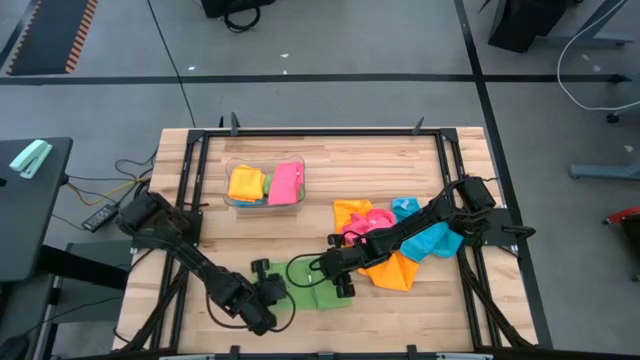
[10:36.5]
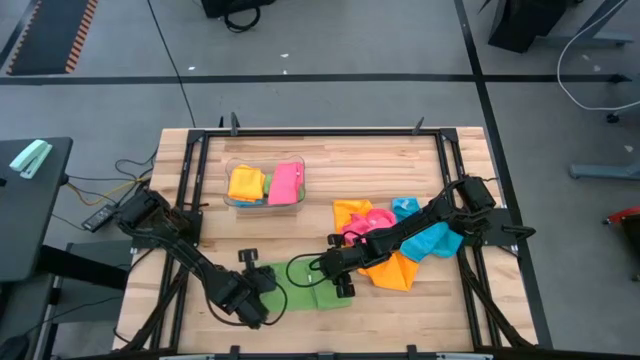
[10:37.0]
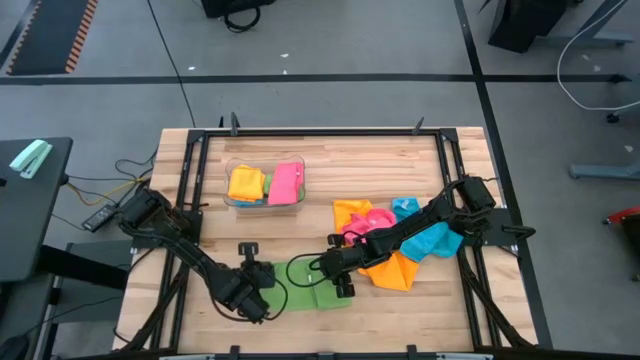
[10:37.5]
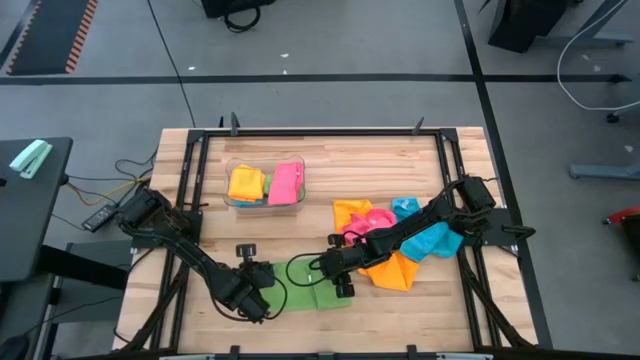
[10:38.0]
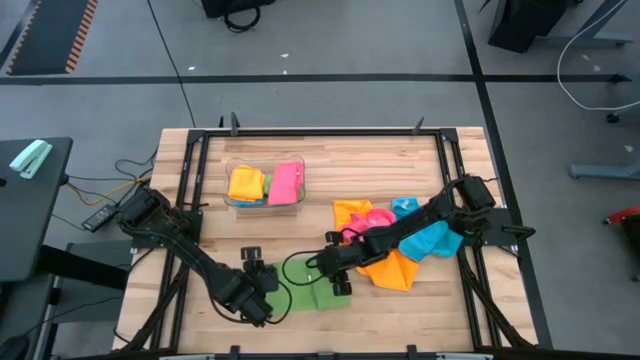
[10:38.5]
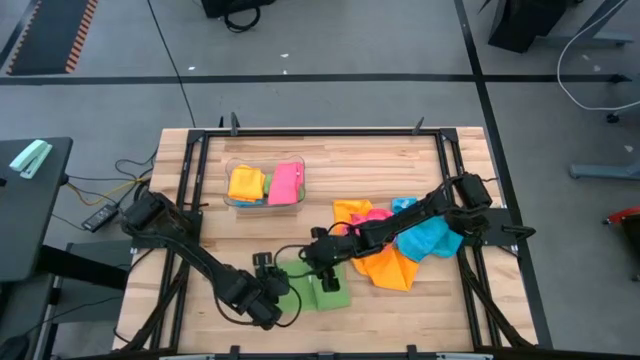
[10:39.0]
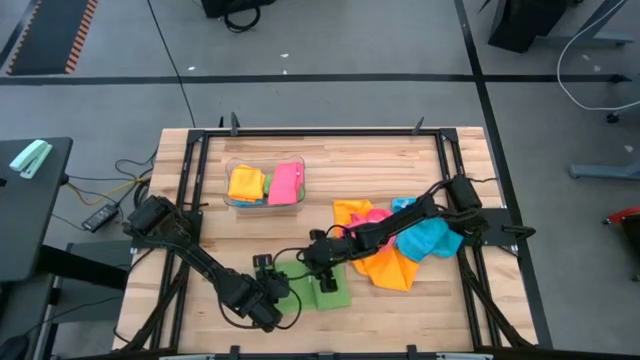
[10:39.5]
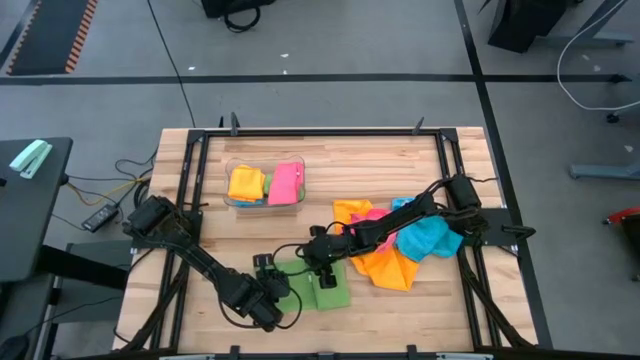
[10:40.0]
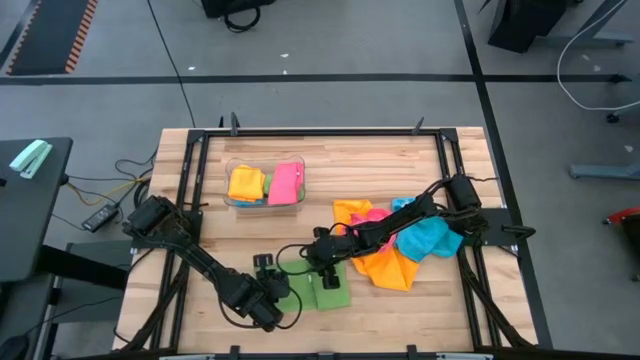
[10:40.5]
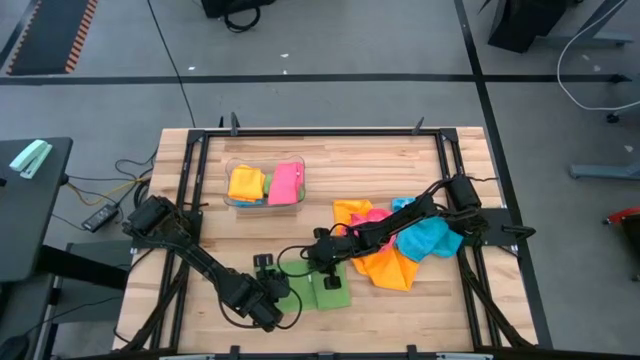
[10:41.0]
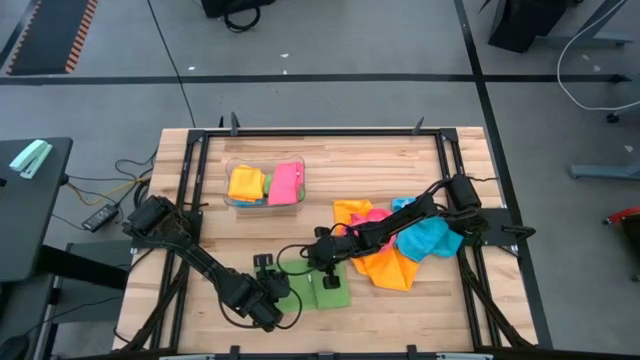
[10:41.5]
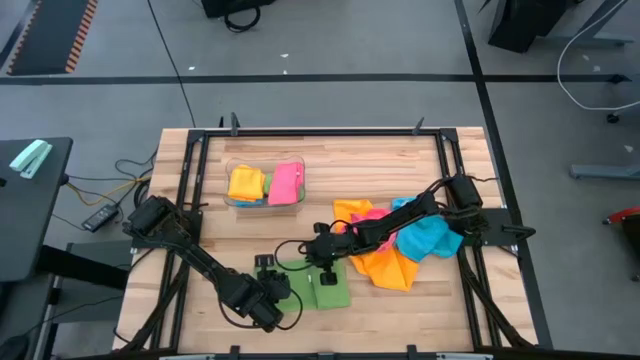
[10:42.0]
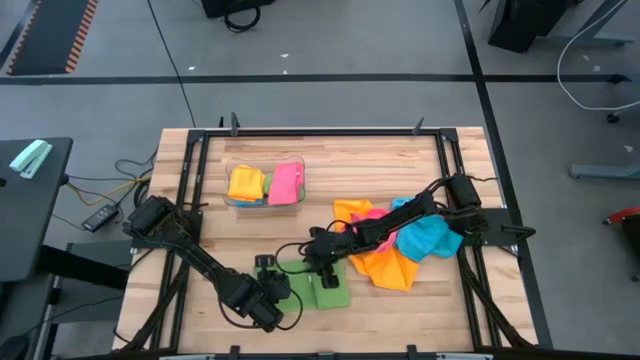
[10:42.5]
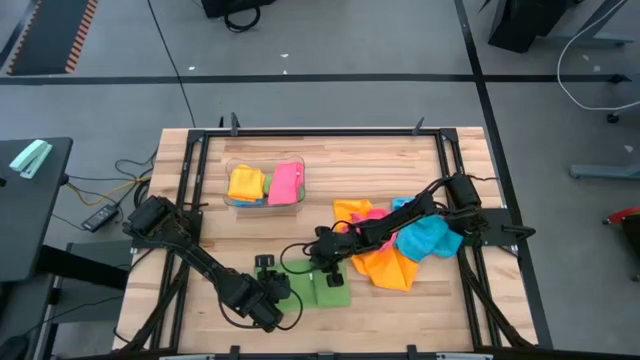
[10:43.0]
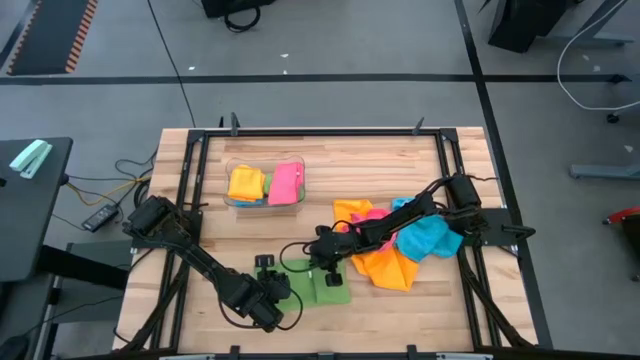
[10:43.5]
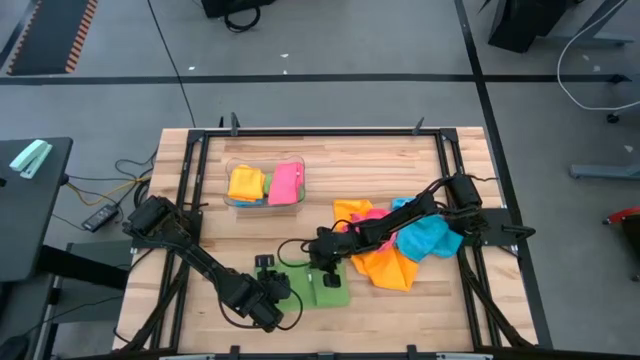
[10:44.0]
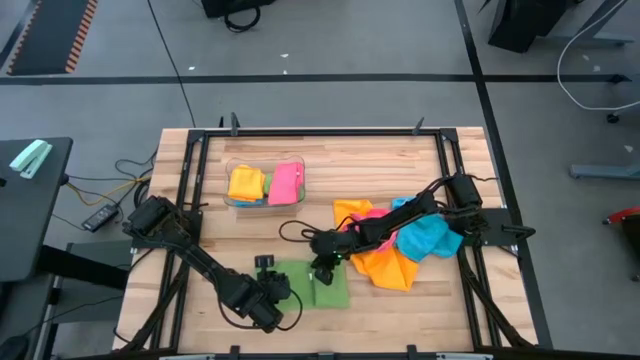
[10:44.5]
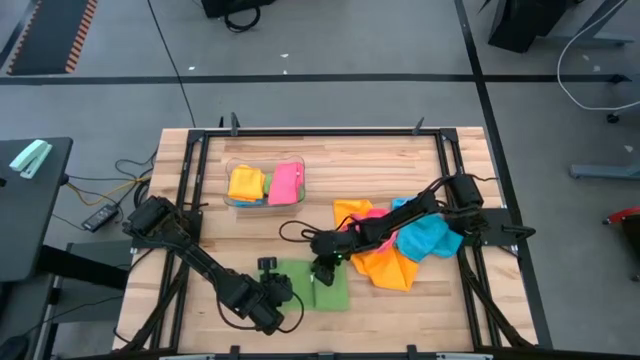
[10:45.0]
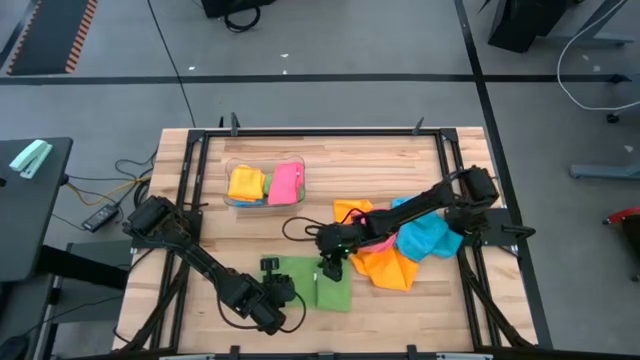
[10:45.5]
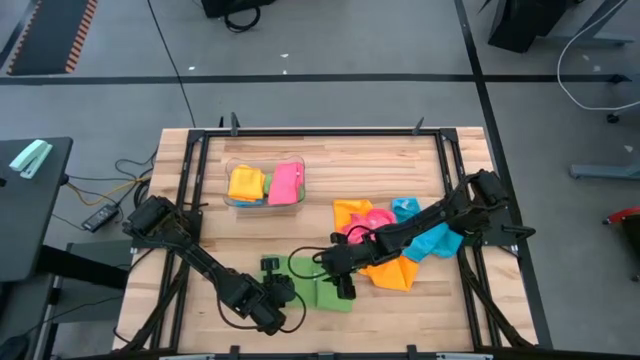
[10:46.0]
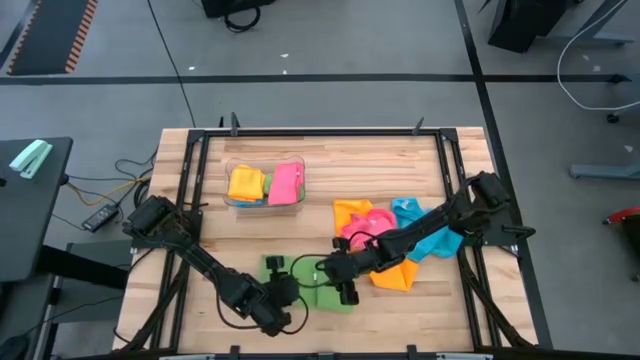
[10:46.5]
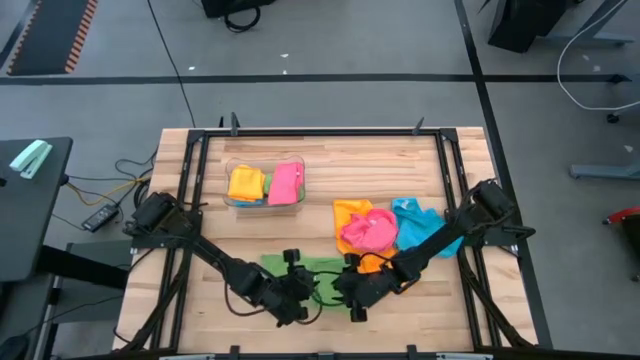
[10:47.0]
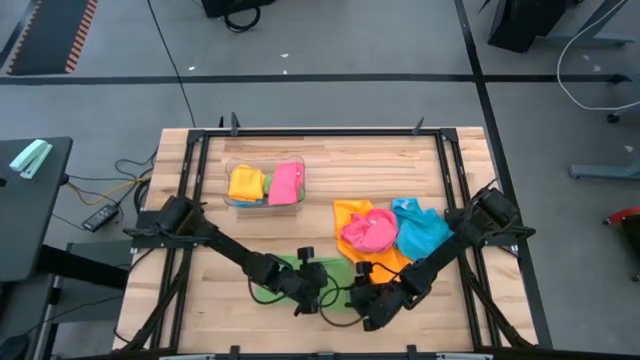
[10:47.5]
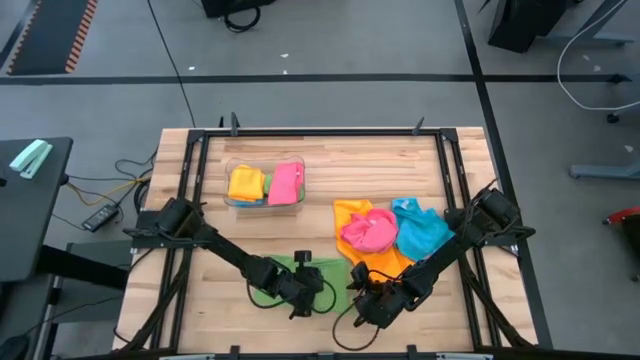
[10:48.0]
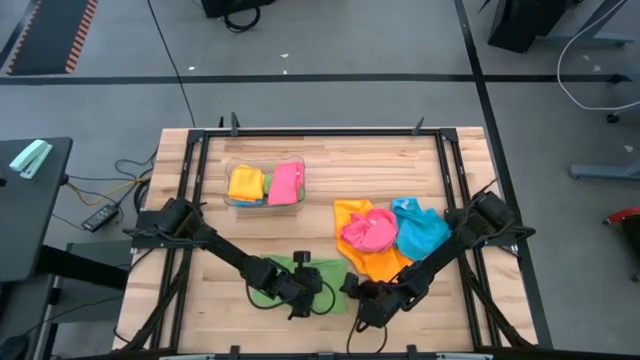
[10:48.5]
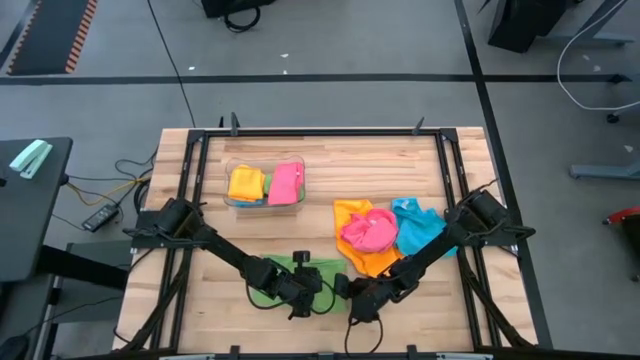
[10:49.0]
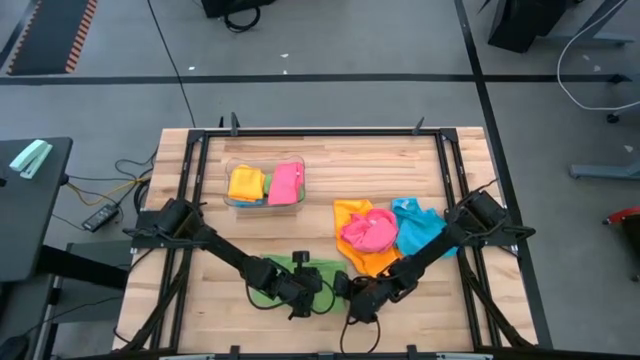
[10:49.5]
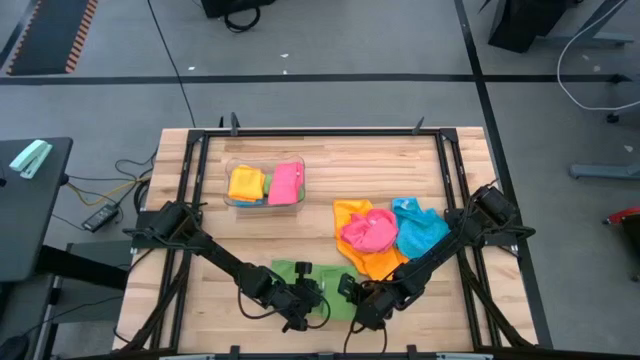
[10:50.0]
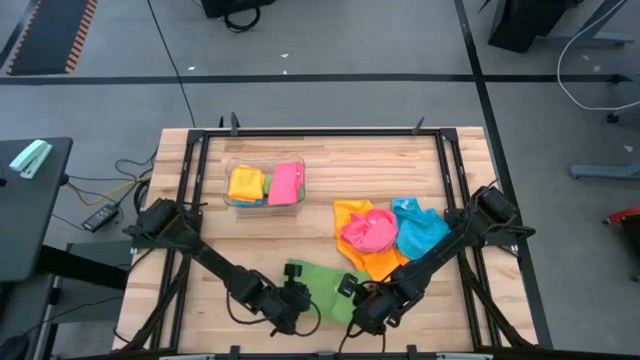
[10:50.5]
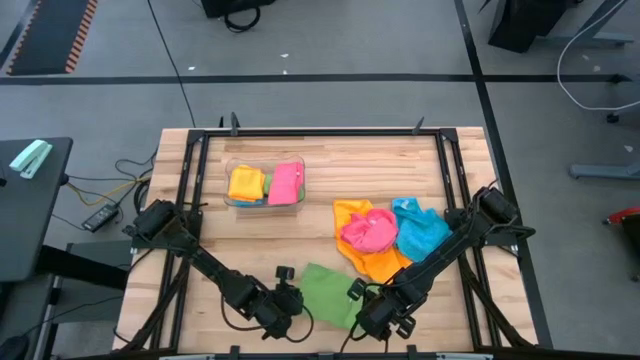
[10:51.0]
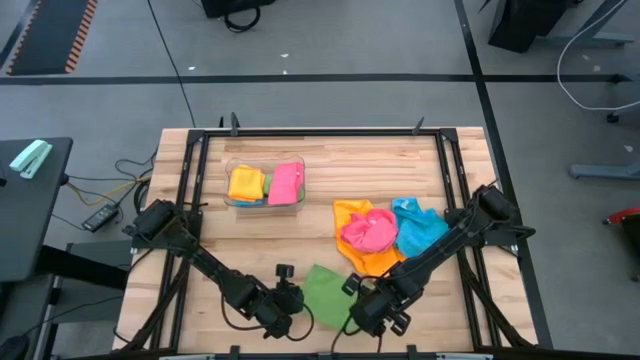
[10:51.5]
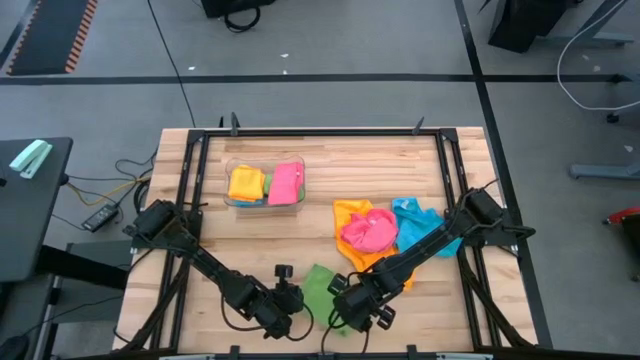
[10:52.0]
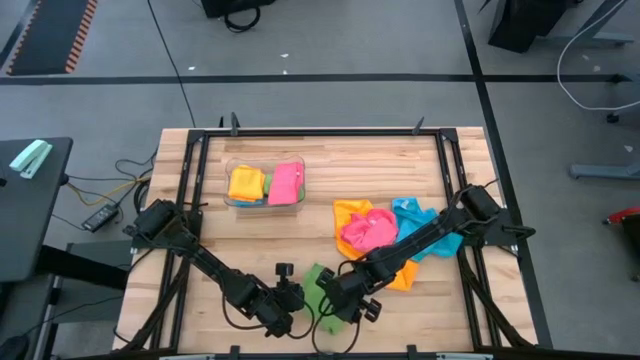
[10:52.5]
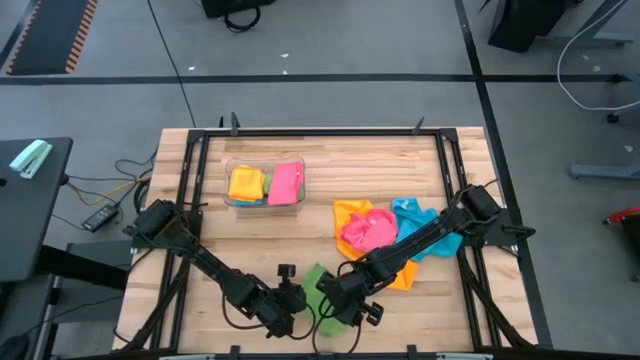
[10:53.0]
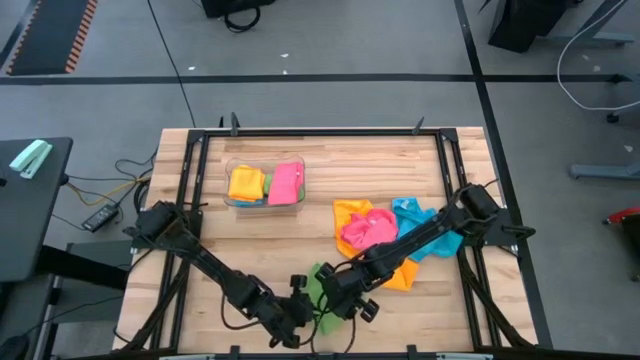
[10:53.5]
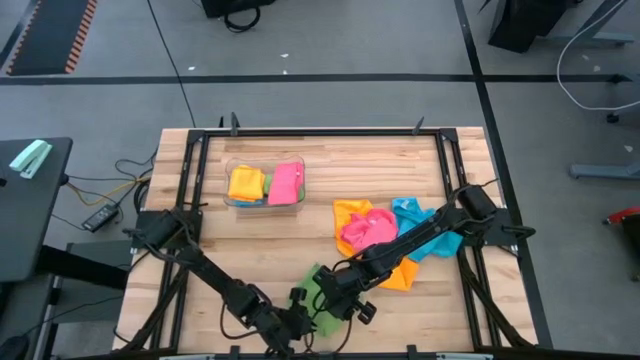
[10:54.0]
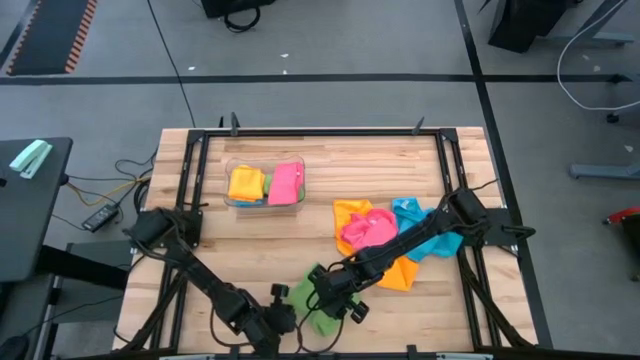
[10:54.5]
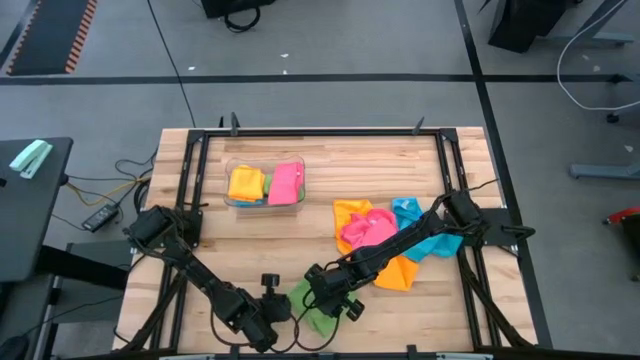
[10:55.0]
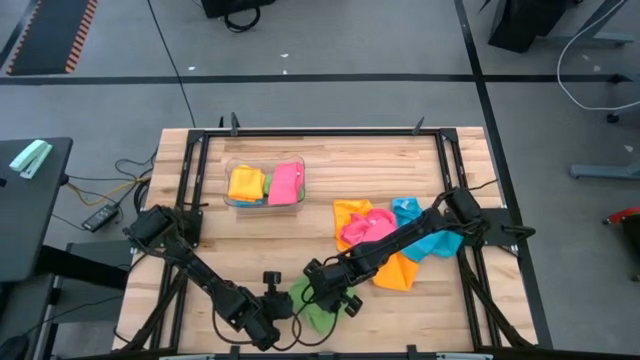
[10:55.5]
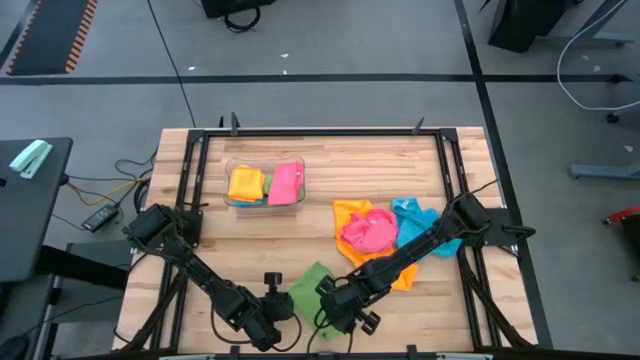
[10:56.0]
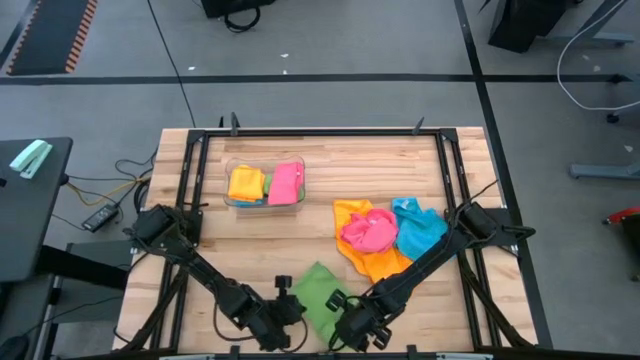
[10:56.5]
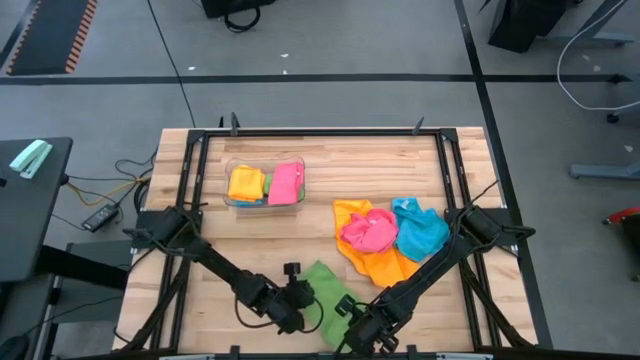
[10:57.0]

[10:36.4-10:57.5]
Task: Fold microfiber towels
Fold the green microfiber towel
